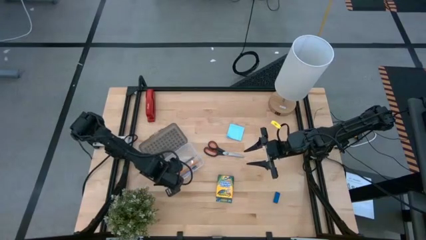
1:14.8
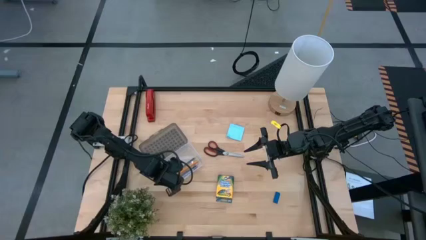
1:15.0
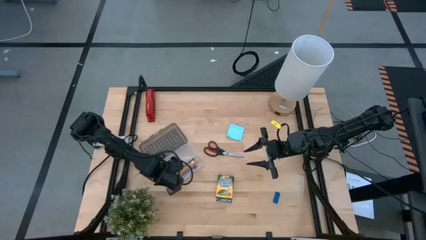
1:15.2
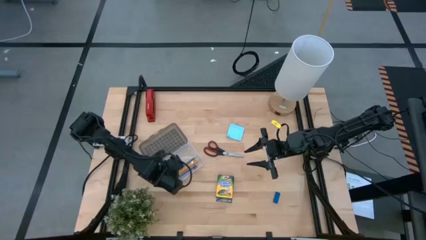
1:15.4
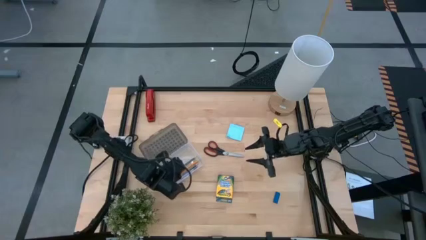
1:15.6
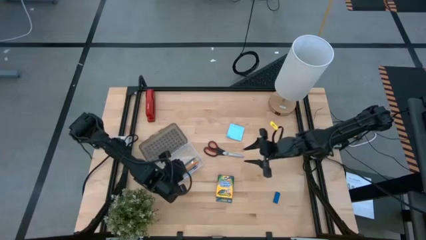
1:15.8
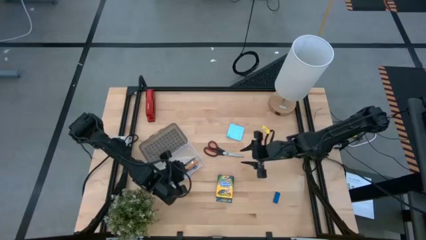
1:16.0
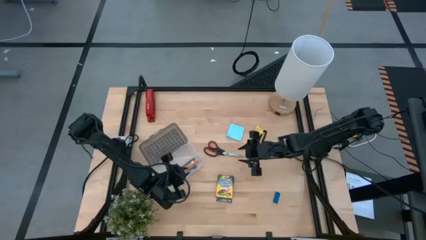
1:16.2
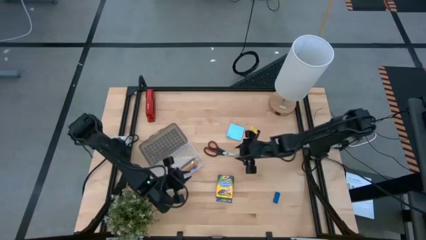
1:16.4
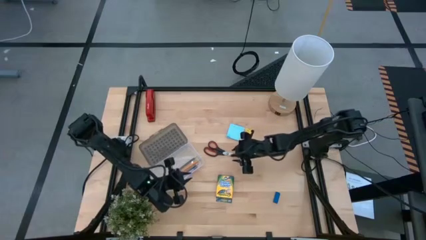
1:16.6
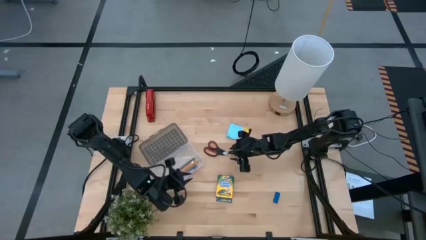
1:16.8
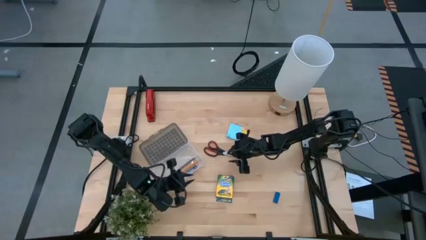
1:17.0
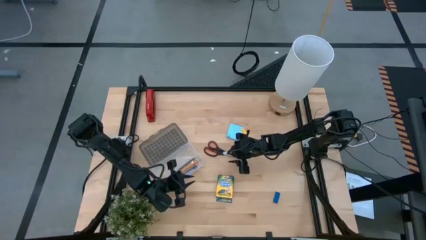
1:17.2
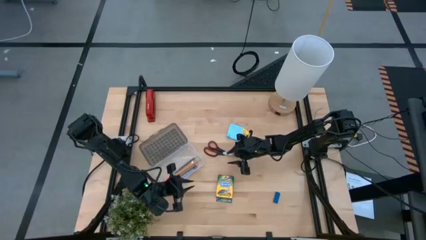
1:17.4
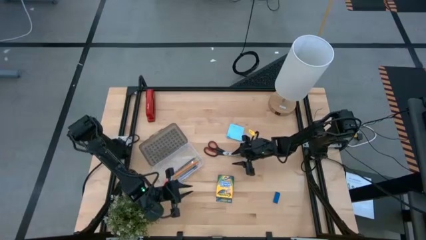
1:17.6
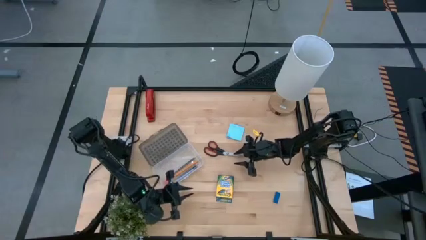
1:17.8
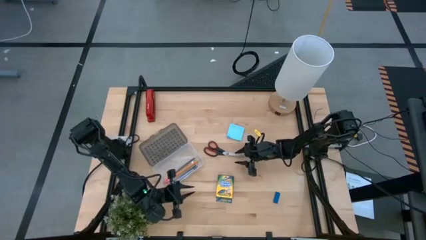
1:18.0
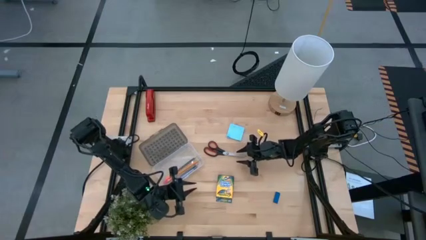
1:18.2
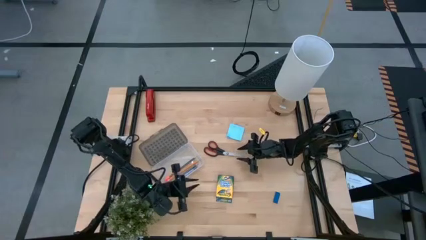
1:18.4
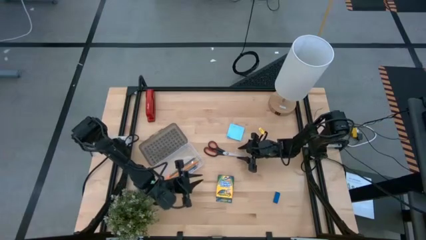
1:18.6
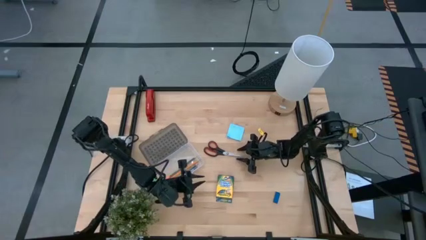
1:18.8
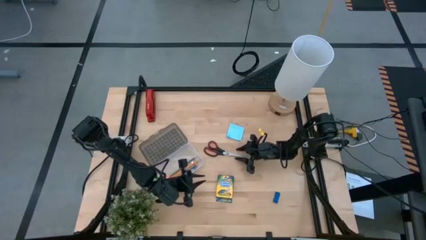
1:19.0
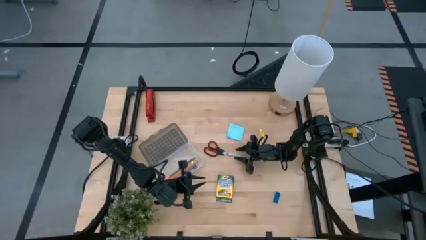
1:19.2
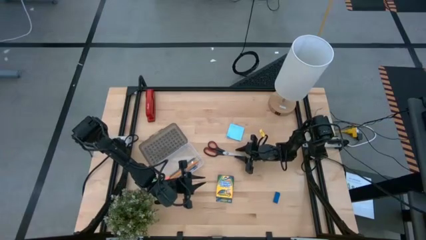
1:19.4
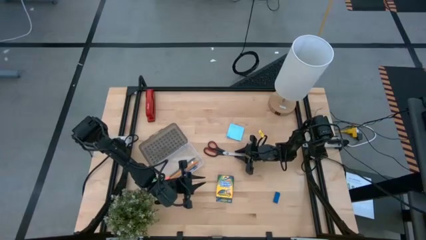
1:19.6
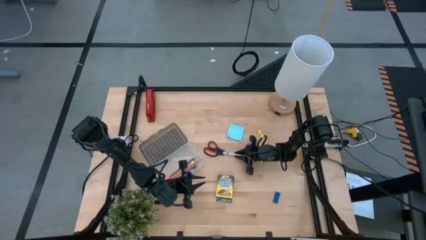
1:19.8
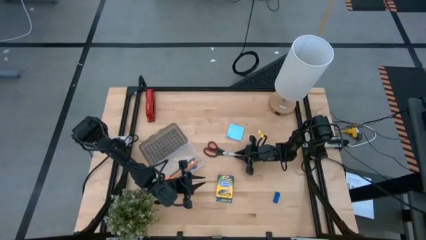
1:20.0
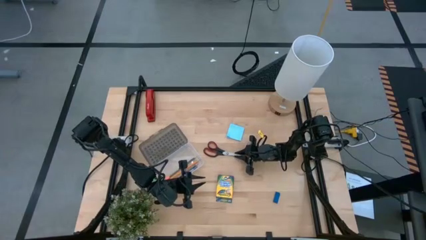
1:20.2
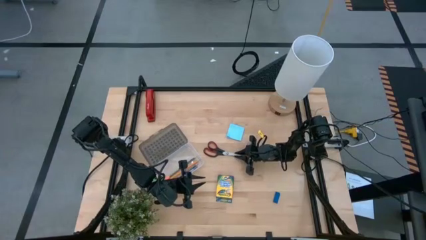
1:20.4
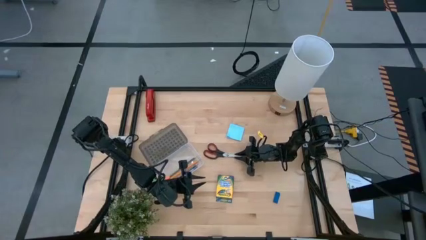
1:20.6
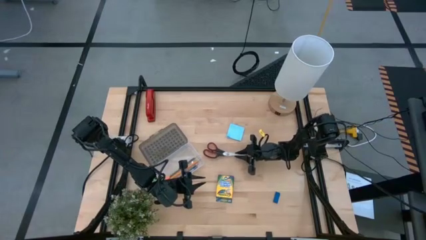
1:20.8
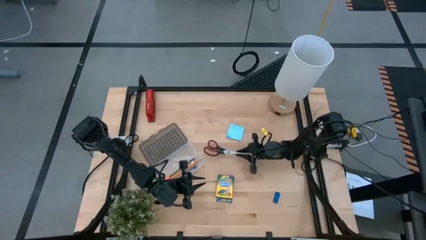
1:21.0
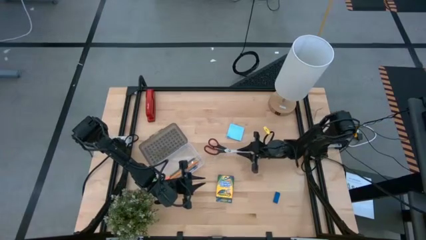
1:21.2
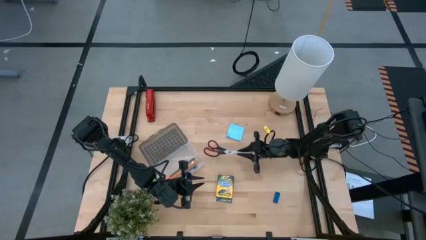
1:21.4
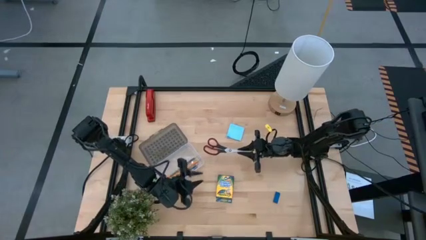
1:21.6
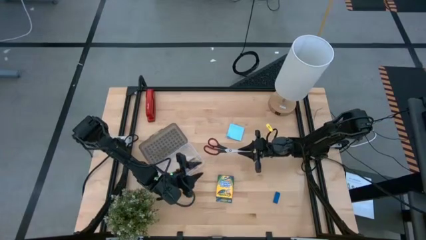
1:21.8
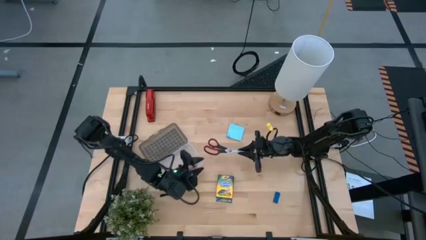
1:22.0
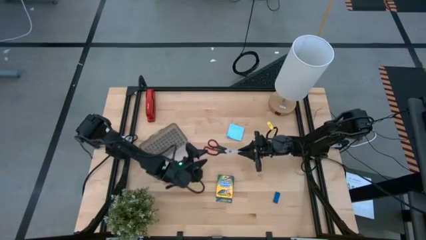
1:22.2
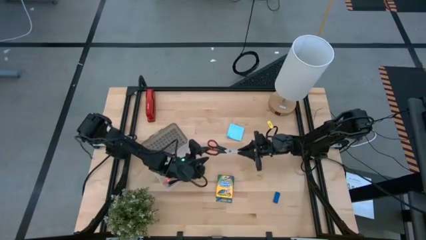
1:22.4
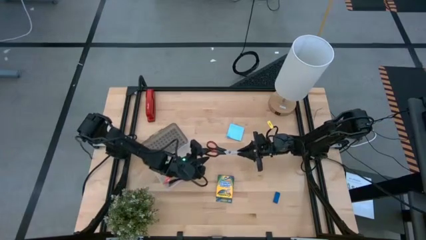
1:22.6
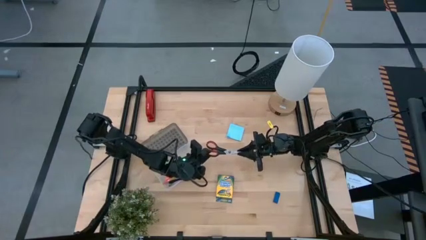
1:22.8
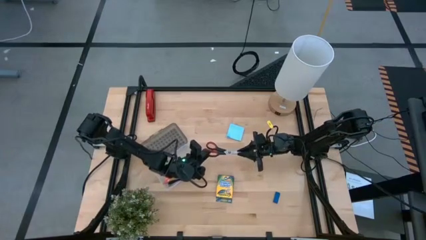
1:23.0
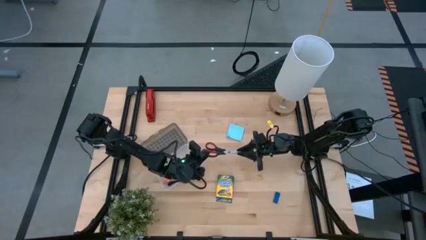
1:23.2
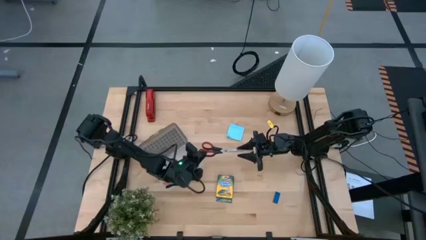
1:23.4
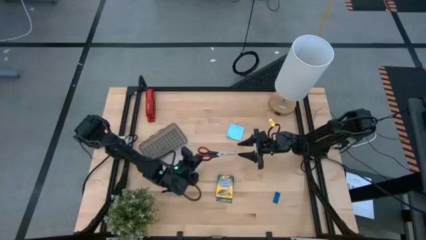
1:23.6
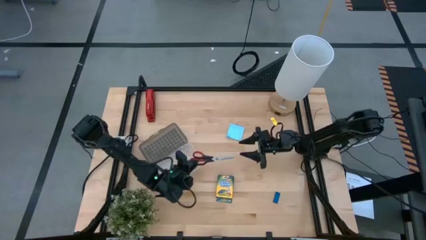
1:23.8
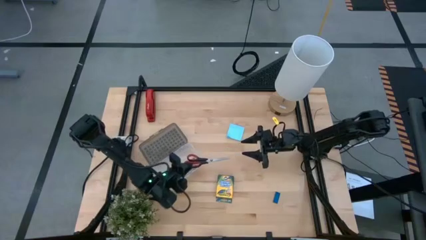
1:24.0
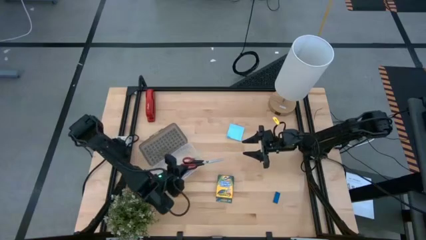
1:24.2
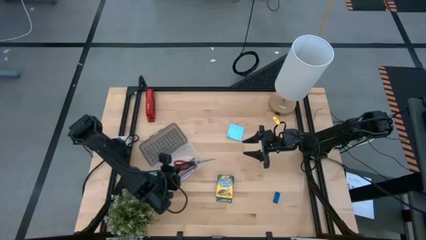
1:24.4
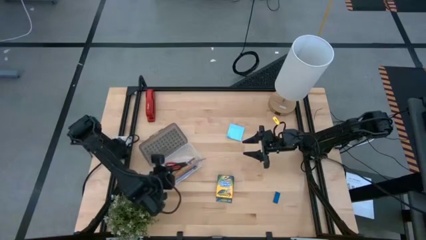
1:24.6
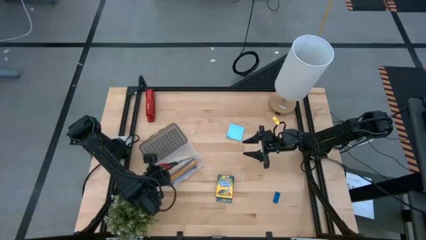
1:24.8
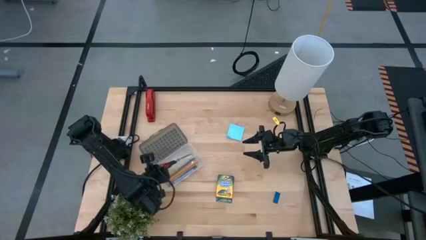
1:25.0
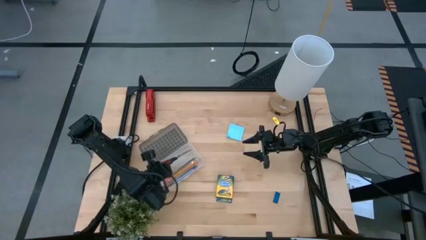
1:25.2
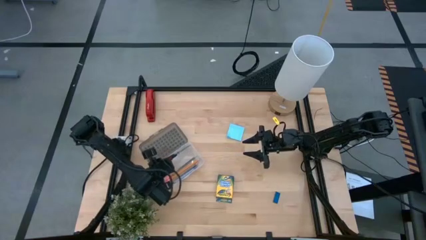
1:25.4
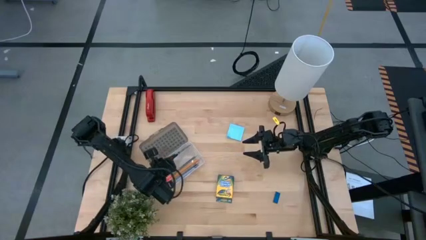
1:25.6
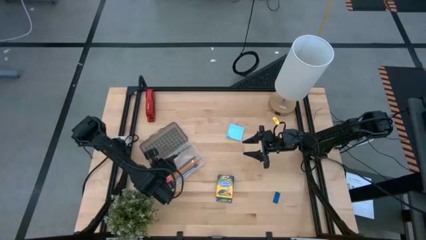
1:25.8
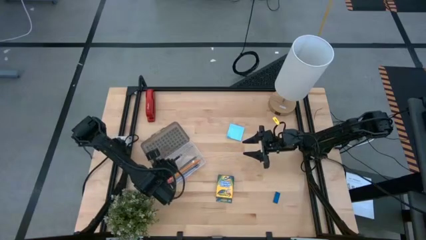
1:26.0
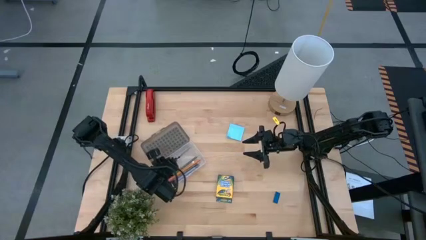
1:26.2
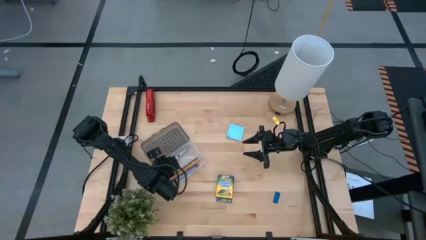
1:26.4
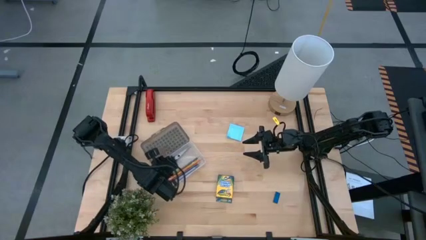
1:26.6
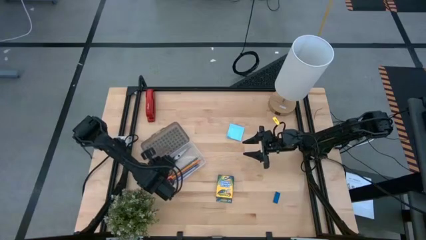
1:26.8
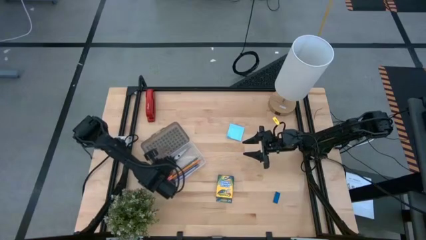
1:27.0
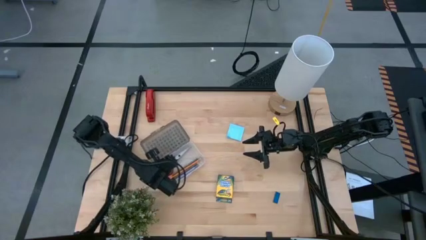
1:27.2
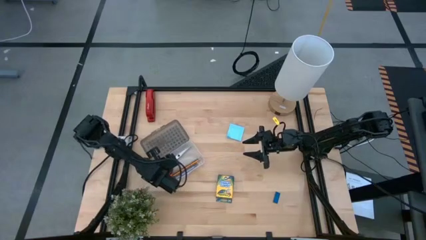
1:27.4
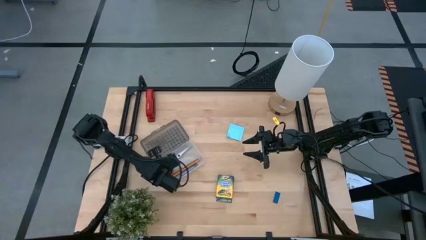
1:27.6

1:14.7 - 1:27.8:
Task: Pack school essentials
Put the black scissors into the supply box

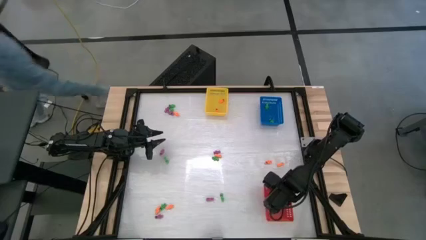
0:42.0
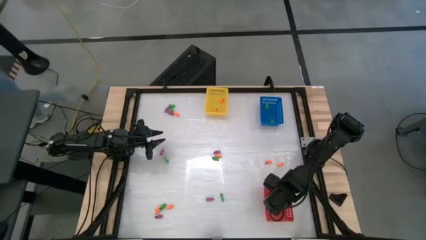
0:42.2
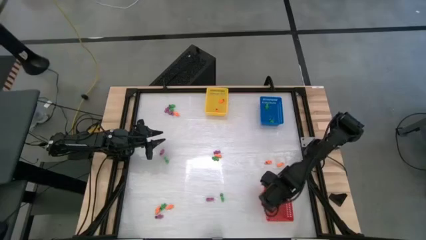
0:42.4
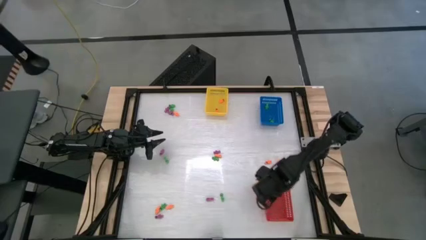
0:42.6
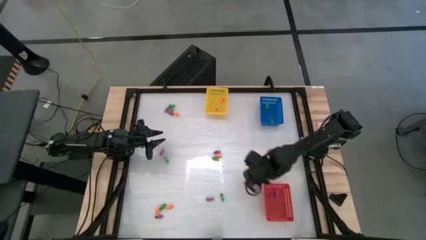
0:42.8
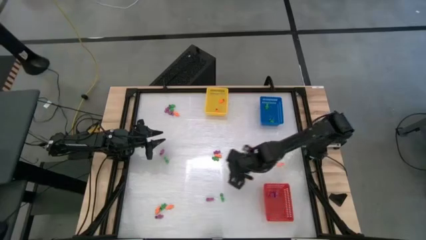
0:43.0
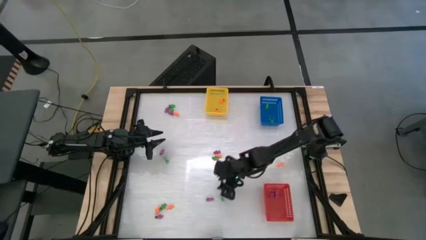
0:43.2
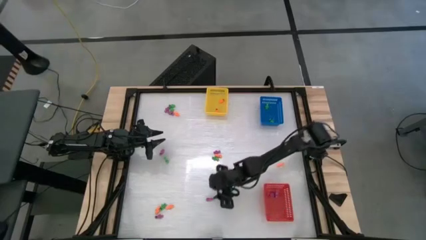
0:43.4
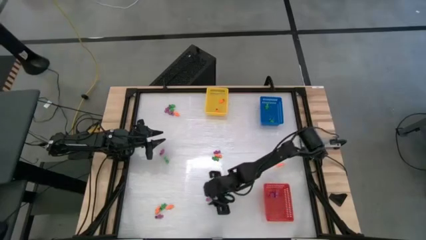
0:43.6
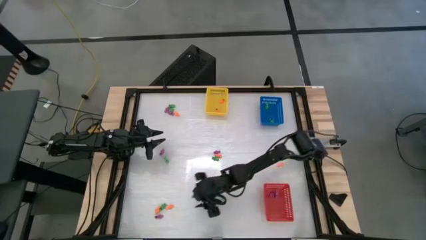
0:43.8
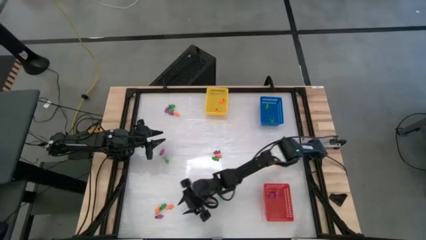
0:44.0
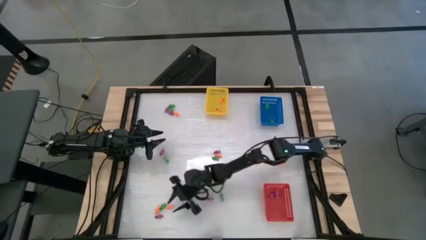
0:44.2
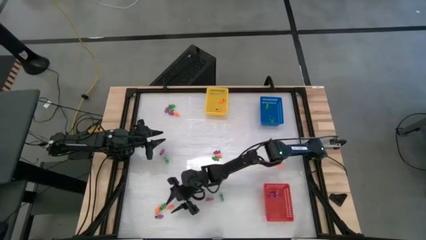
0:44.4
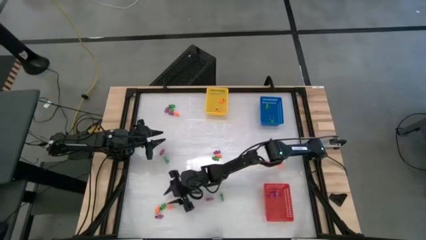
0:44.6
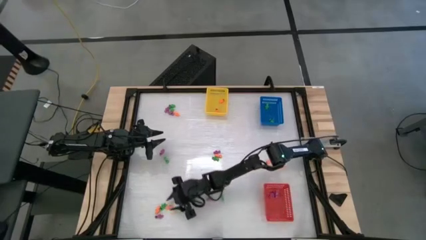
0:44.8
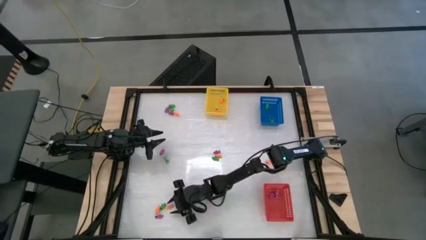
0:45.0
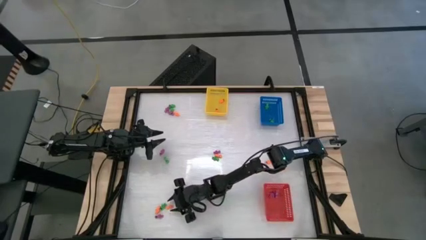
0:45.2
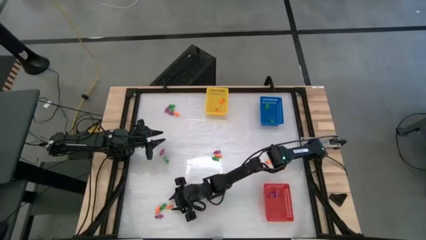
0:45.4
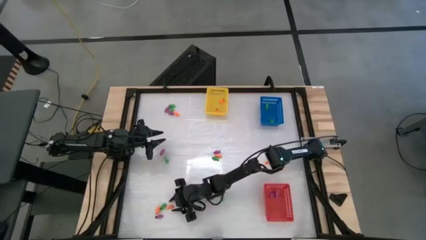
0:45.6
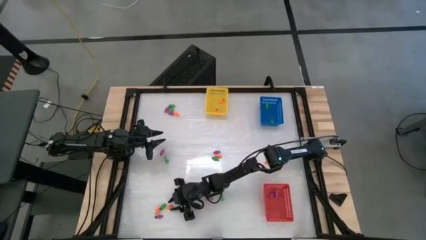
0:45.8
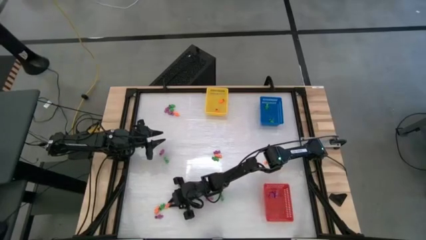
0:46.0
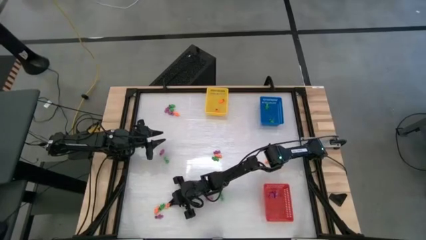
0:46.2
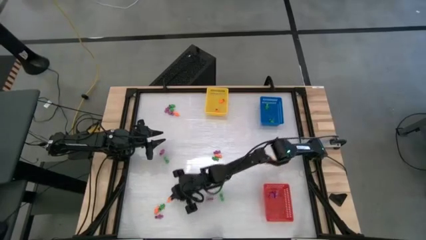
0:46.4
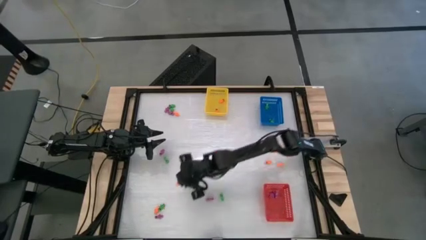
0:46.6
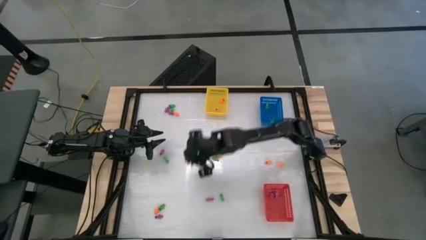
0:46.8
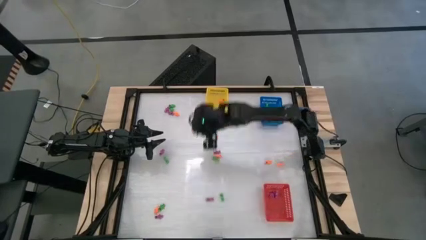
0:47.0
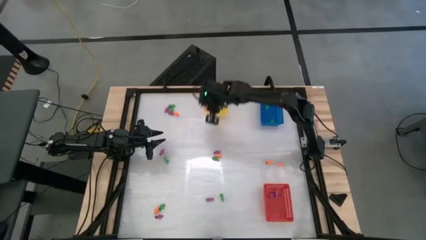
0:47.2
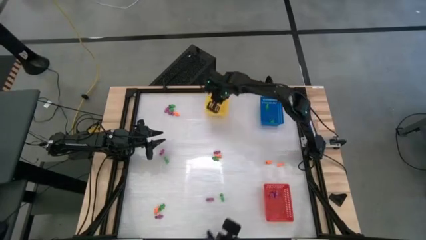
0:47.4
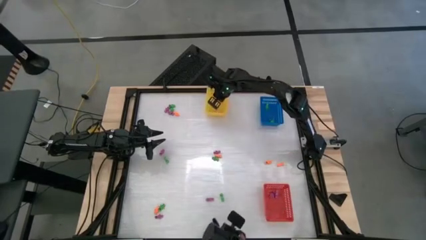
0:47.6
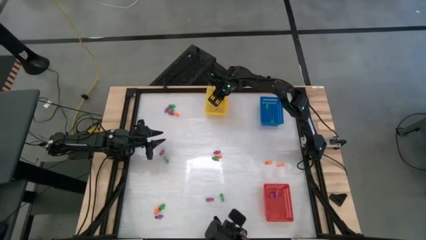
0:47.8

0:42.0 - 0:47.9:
Task: Sort Halloween decoration
Put the orange skeleton toy into the yellow bin
